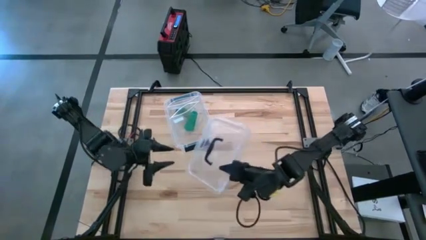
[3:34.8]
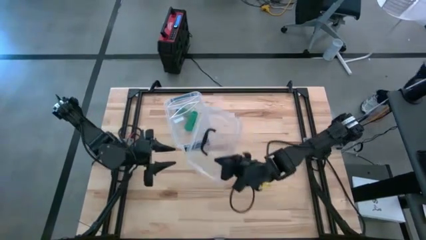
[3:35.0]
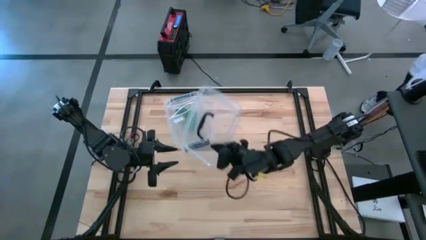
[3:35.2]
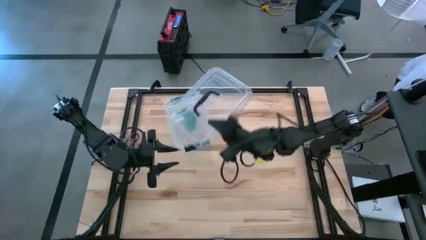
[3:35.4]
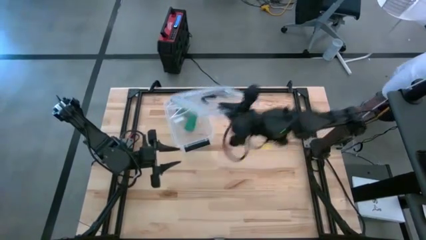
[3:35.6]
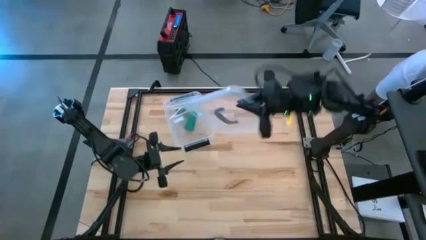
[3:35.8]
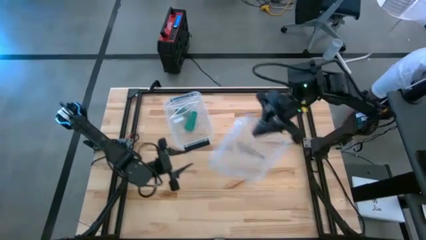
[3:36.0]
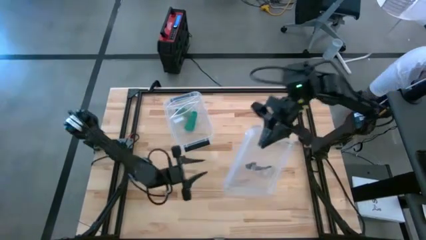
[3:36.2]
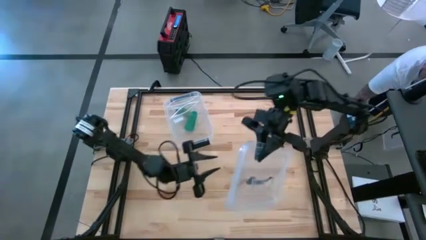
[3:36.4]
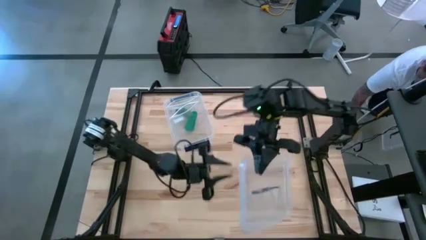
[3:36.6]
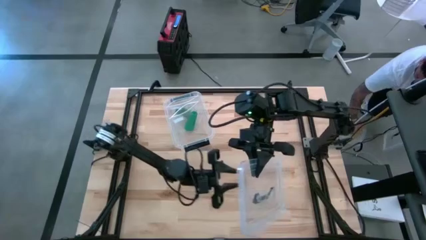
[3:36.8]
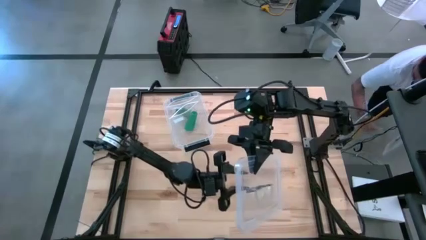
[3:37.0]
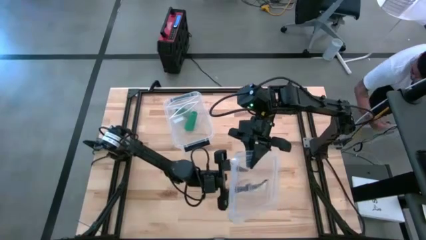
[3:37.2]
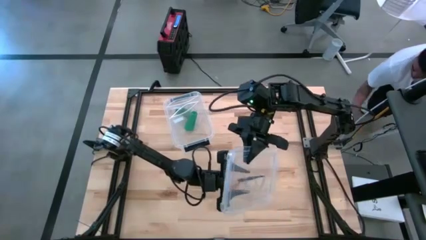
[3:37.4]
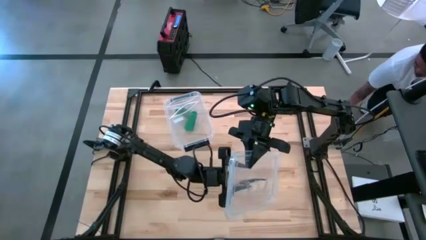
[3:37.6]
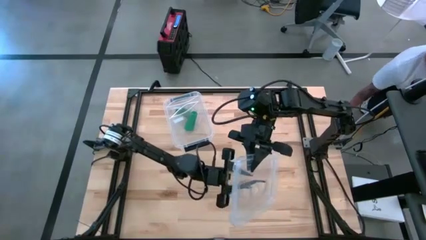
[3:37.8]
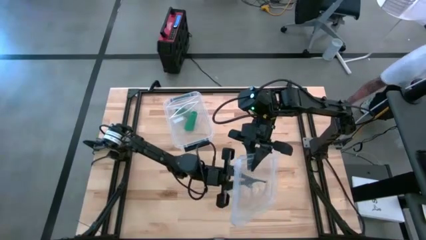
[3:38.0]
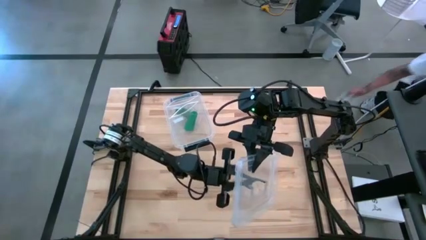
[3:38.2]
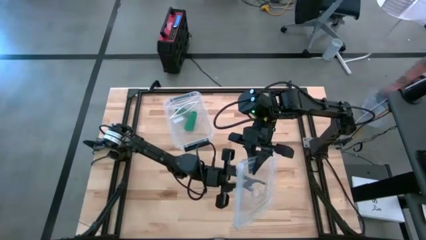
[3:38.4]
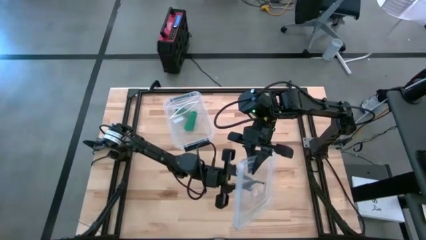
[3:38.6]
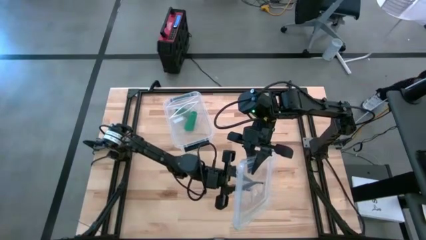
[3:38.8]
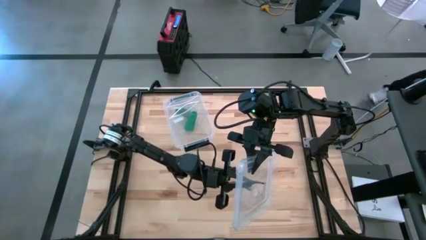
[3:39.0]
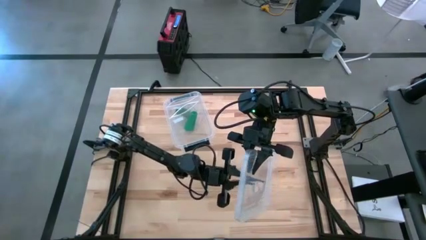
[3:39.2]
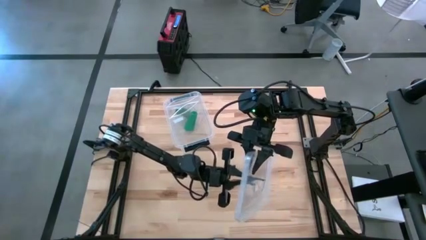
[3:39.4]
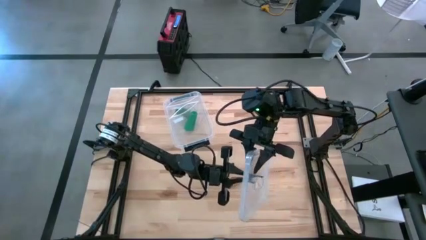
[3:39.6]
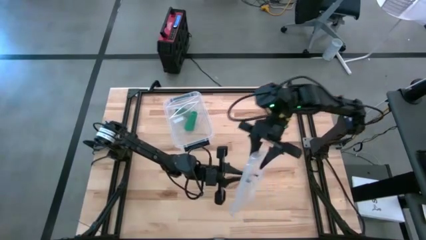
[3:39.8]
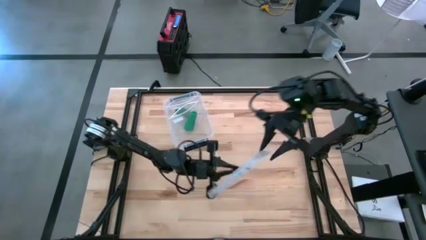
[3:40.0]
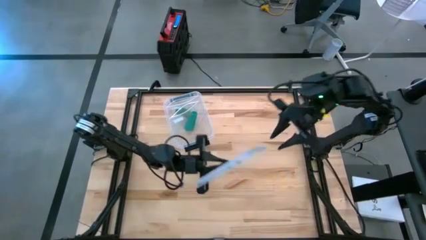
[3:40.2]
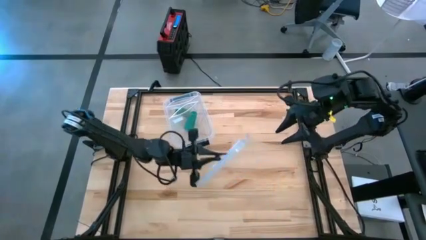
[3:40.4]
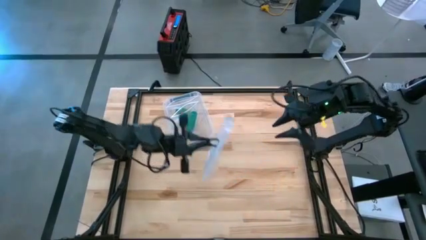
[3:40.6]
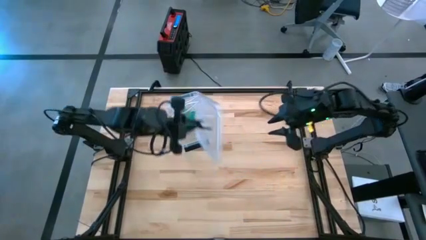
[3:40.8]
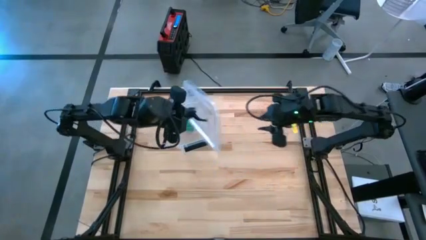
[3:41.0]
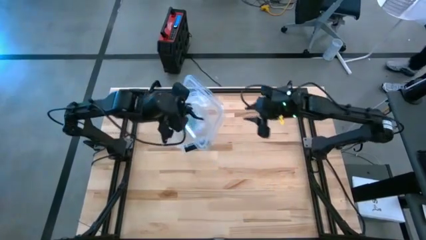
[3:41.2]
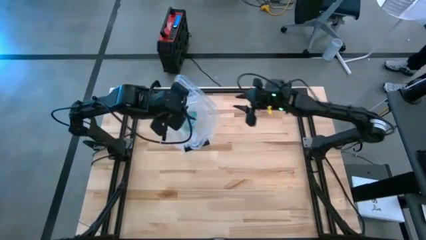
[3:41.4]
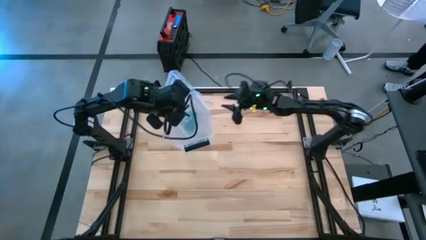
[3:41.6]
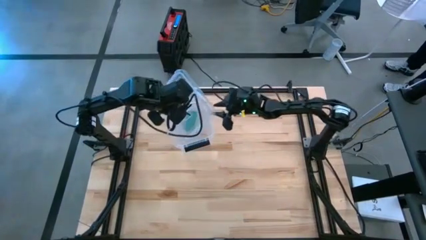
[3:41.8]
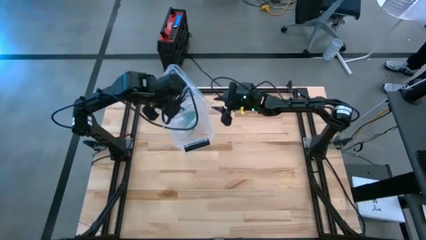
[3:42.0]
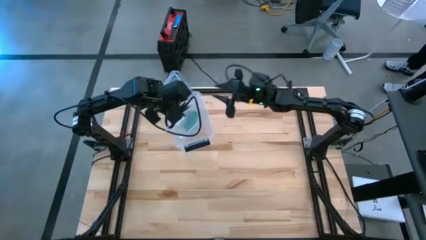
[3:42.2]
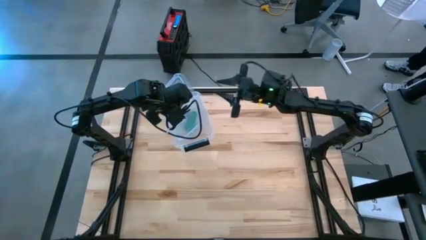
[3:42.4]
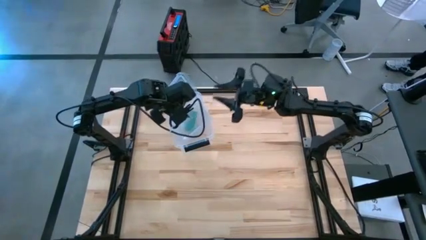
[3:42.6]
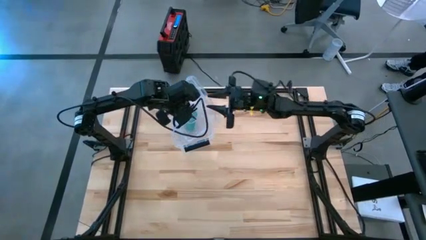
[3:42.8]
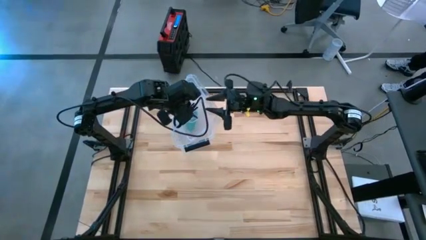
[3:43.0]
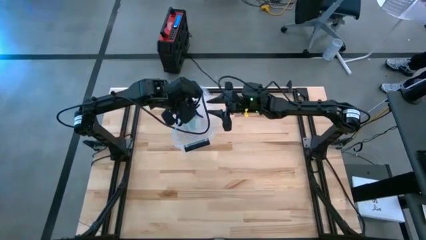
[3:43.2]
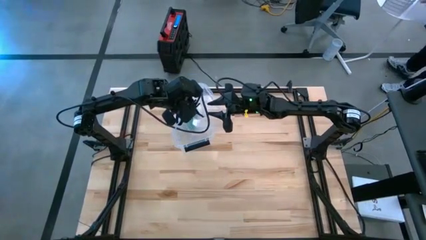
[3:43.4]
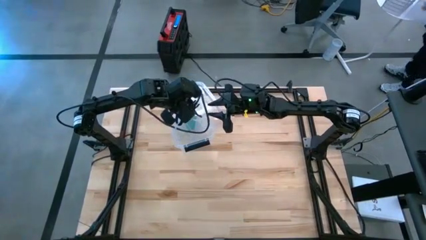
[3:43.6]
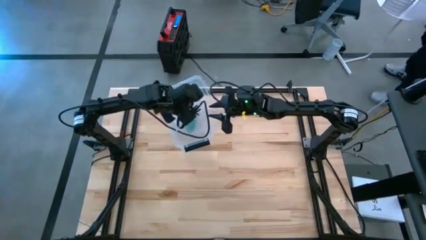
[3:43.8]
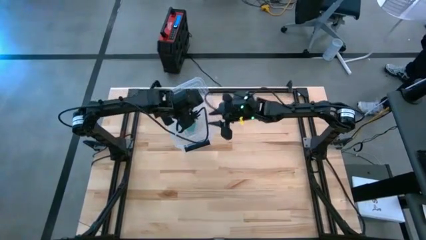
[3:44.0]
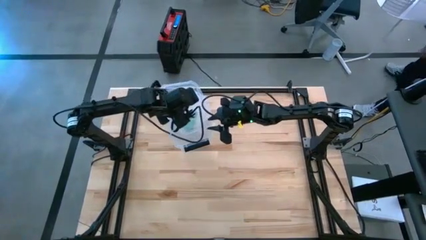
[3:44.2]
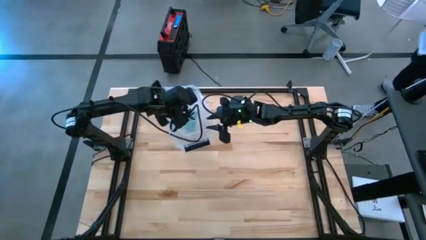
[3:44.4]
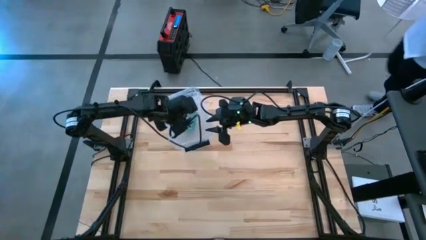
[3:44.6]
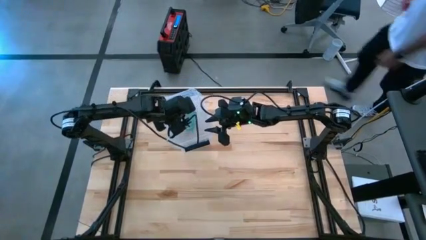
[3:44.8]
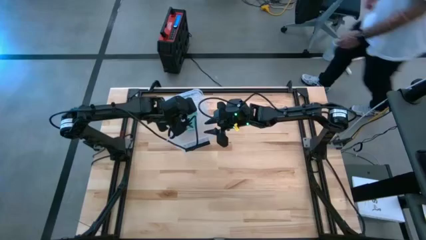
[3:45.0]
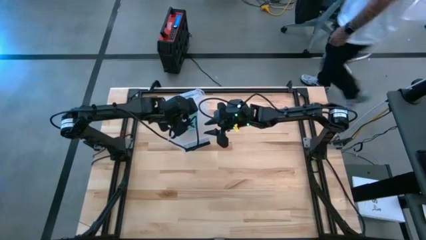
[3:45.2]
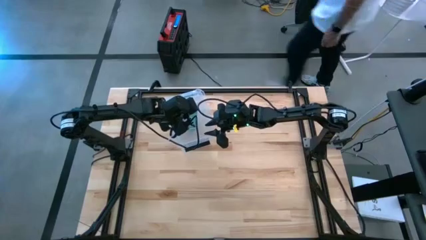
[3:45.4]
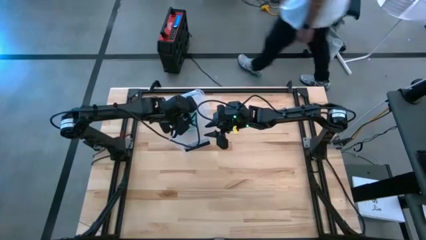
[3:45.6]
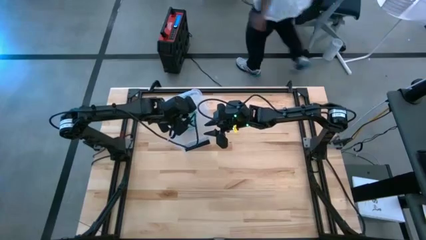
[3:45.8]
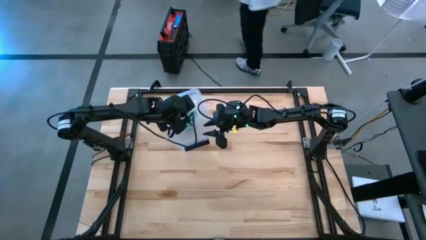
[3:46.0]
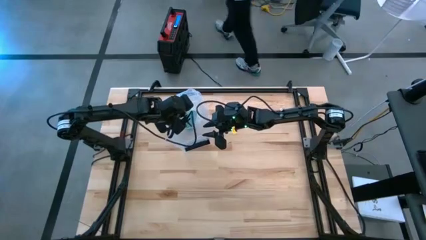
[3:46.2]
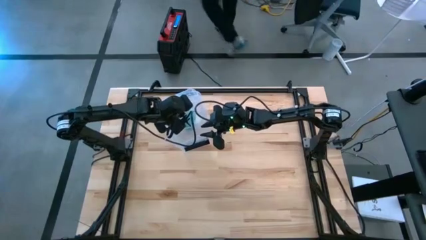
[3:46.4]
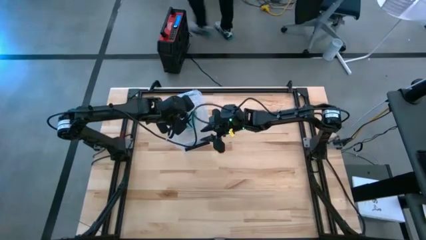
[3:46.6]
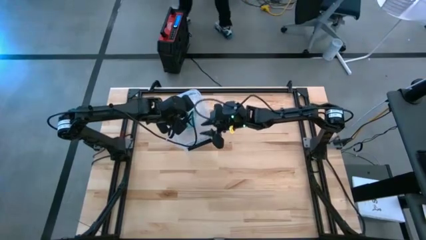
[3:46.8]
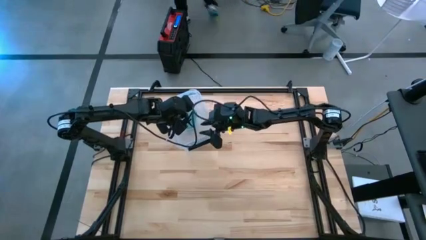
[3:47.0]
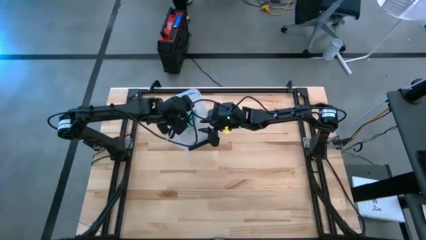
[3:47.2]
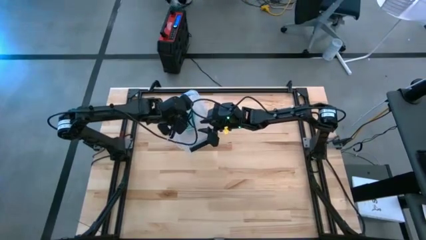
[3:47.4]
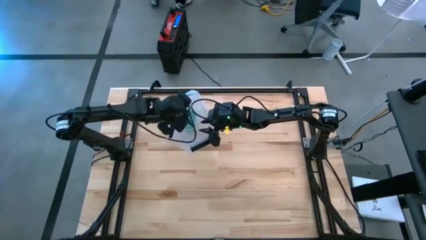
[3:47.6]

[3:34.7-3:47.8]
Task: Roll bandage
Close the transparent bin

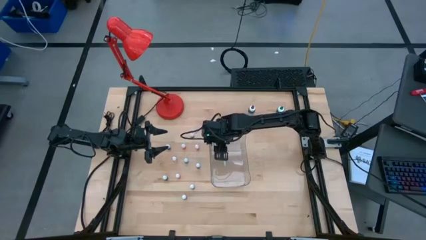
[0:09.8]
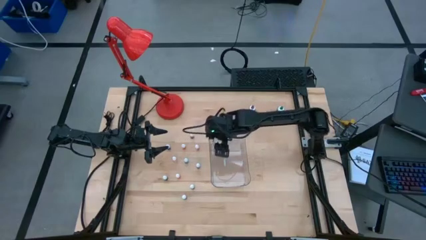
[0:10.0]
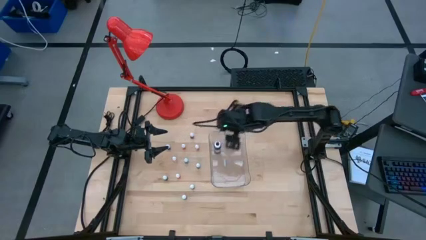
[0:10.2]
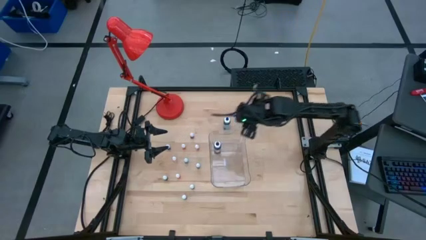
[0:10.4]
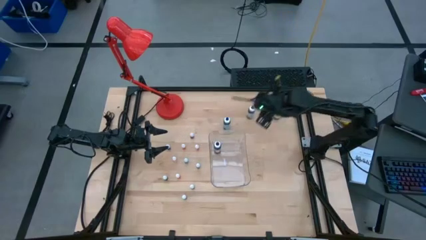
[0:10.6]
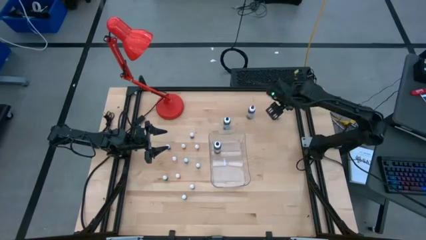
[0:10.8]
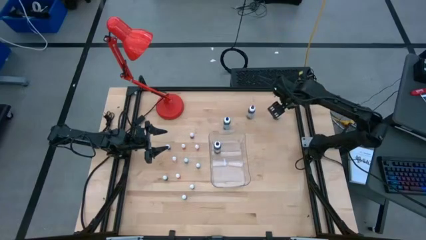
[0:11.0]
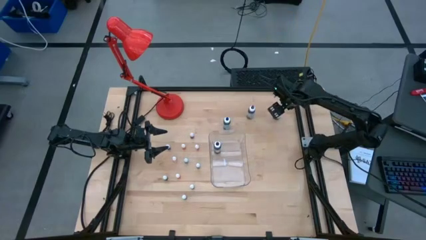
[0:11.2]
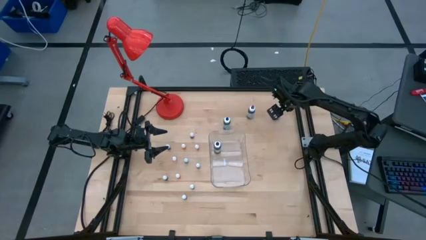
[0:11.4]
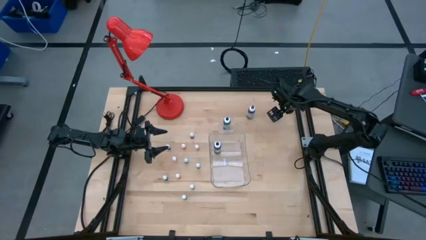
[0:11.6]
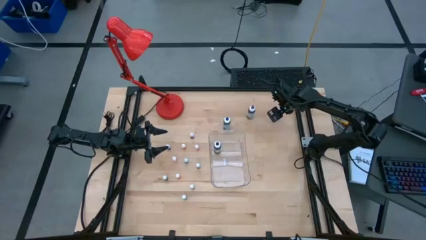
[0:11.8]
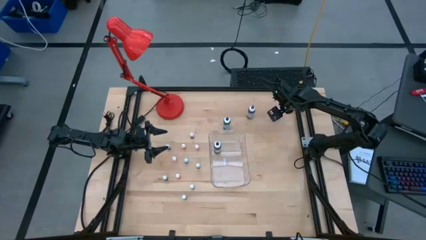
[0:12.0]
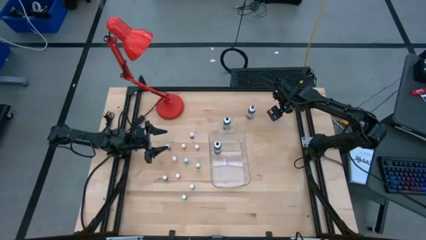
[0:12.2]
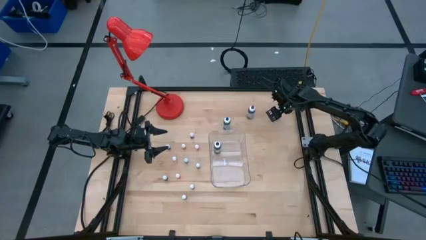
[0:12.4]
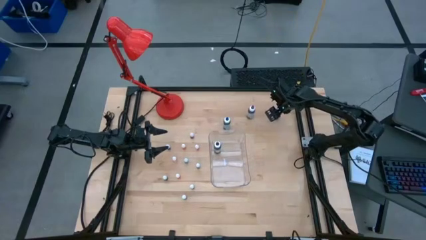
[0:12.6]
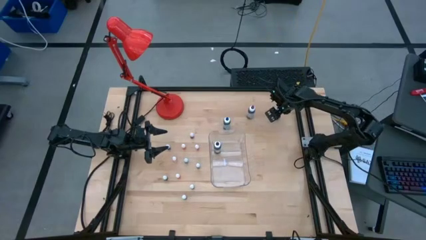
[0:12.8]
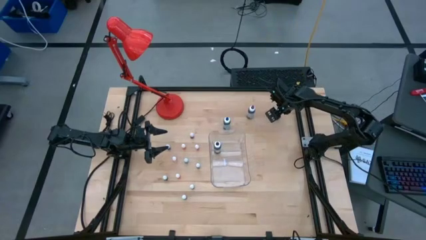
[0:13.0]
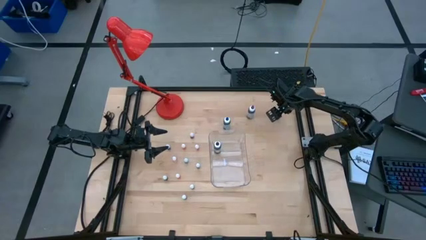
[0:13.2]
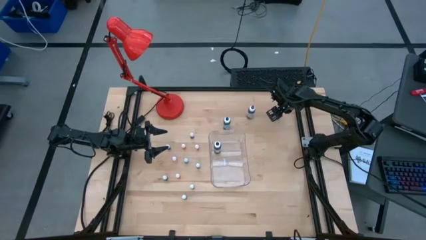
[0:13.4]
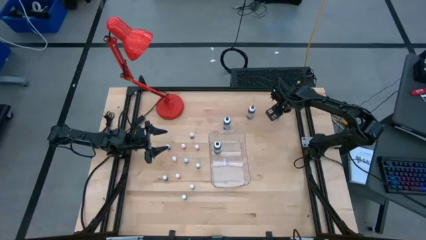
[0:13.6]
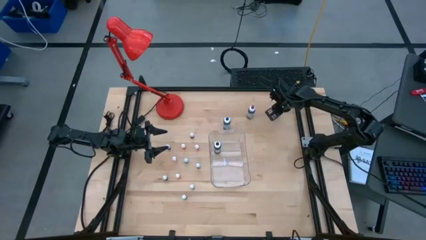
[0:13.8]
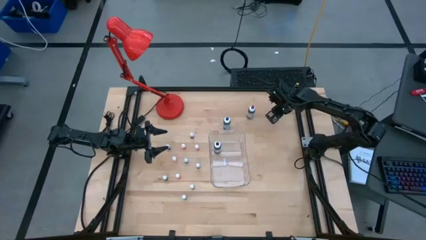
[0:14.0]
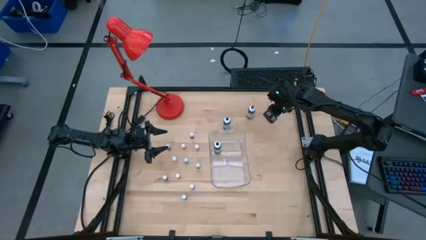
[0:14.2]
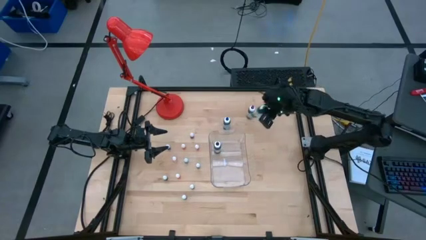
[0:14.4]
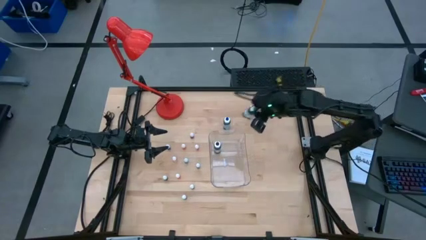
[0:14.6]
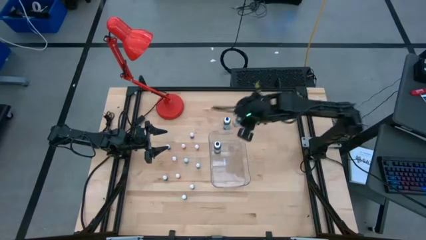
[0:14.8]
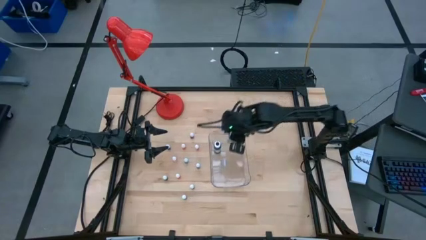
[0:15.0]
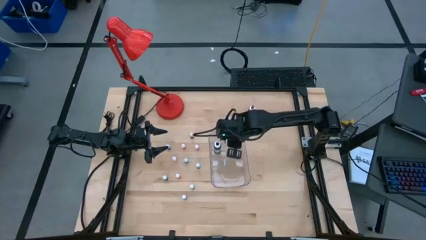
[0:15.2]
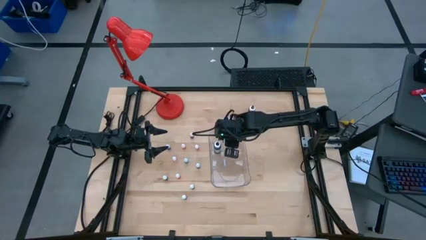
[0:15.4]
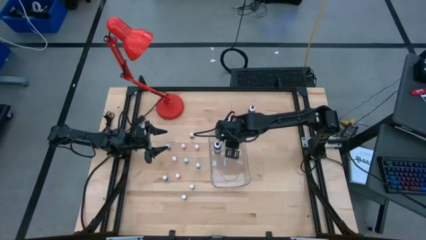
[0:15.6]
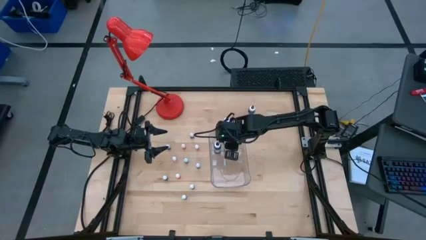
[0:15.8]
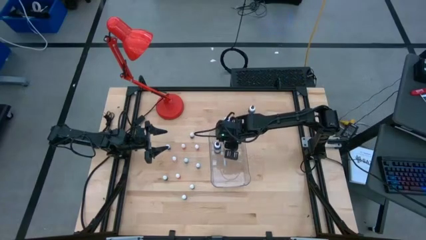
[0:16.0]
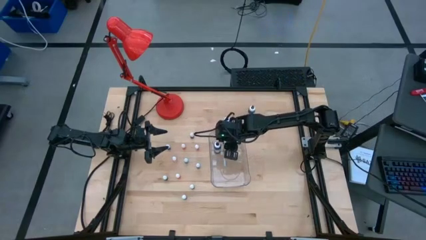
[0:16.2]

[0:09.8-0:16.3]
Task: Pick & Place food coloring
Put the green food coloring bottle into the transparent container
